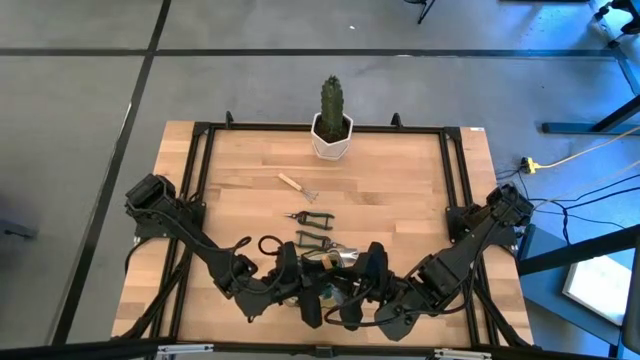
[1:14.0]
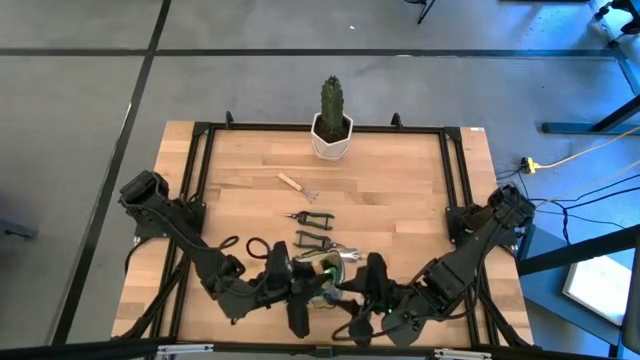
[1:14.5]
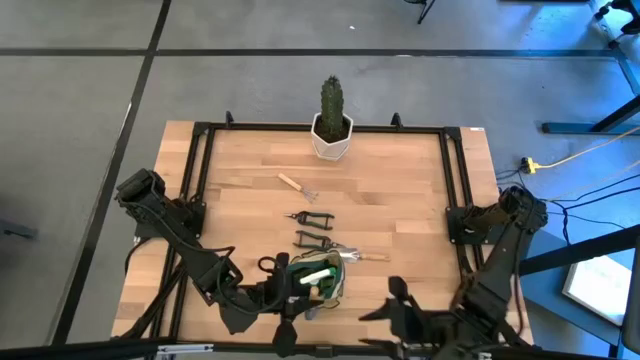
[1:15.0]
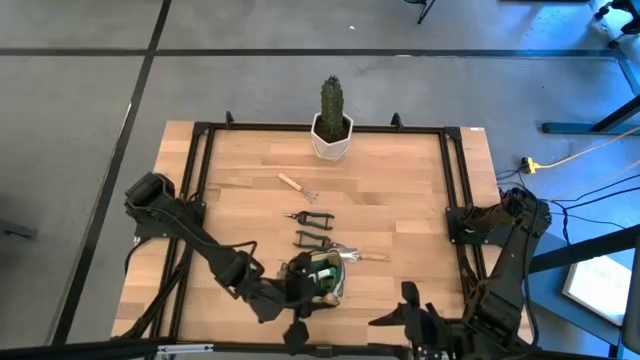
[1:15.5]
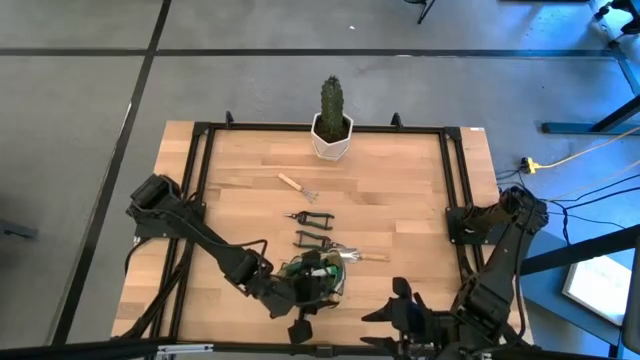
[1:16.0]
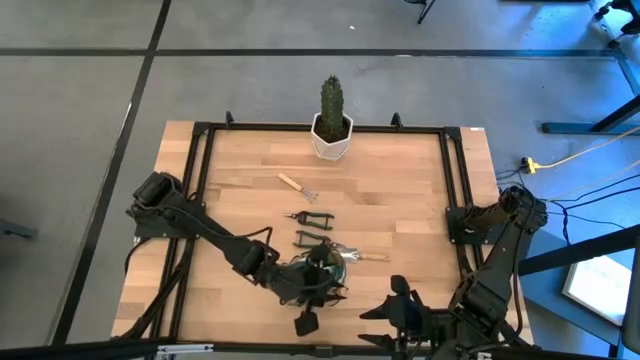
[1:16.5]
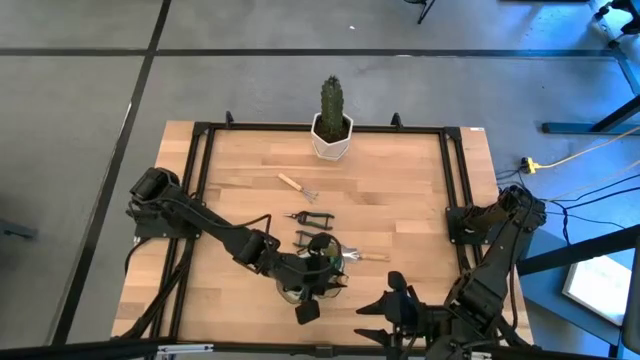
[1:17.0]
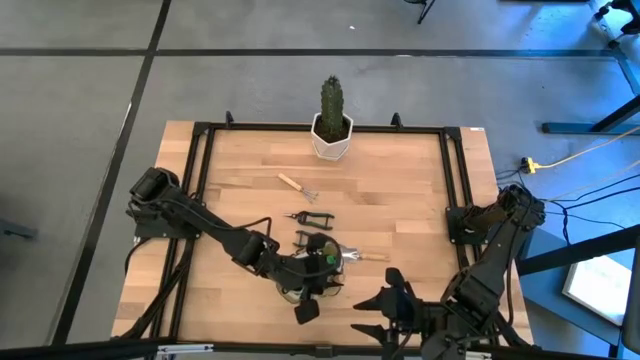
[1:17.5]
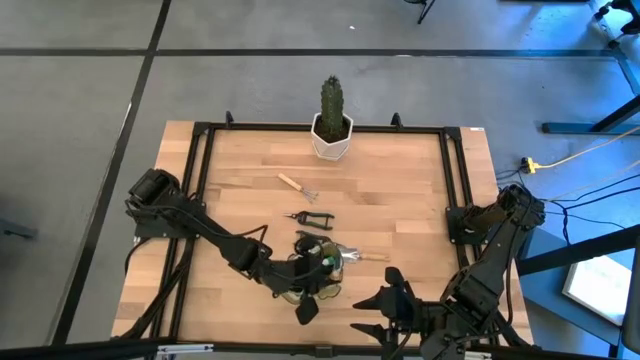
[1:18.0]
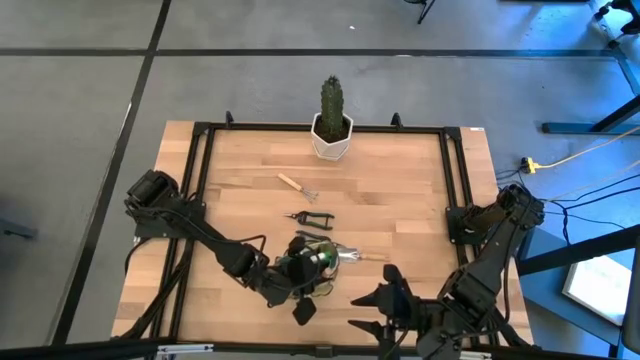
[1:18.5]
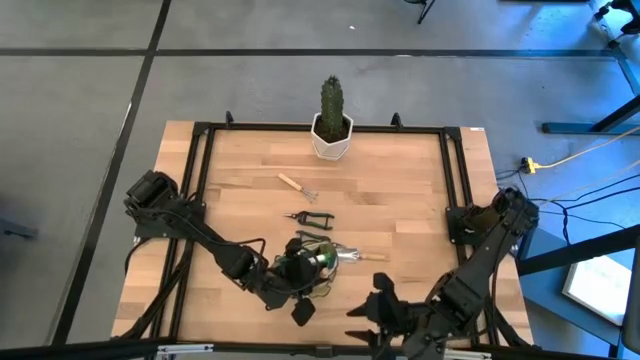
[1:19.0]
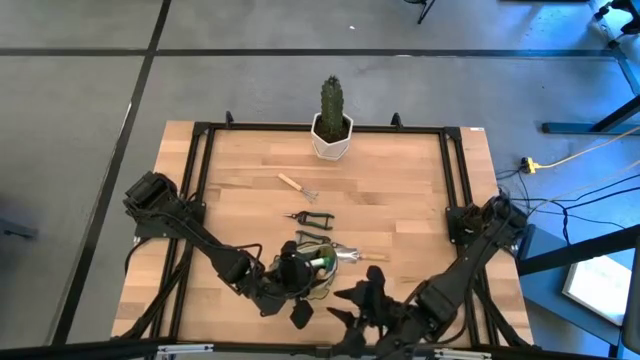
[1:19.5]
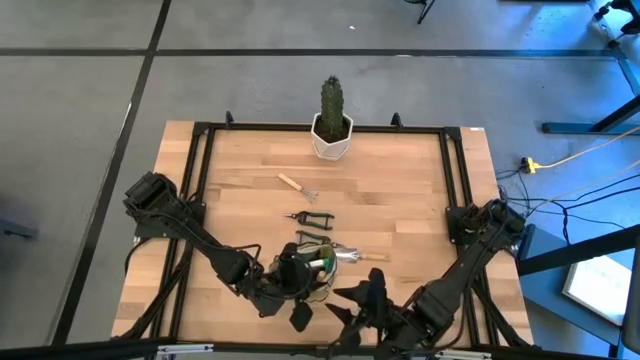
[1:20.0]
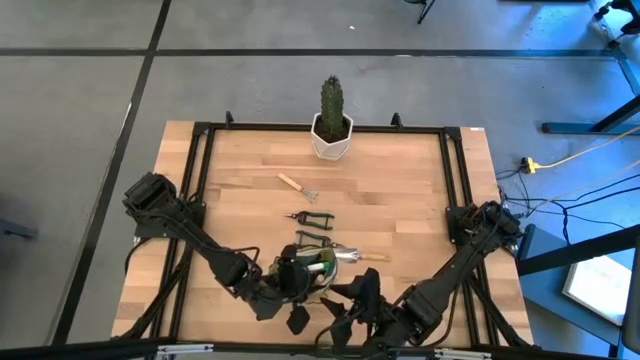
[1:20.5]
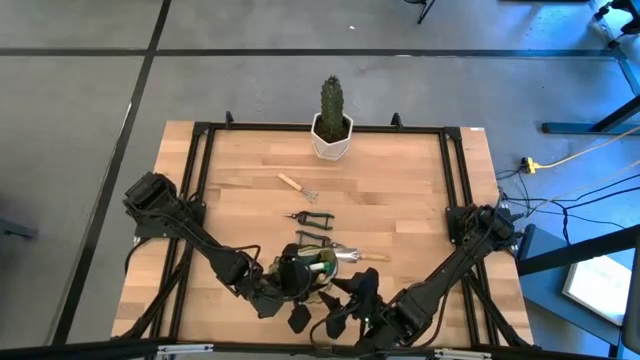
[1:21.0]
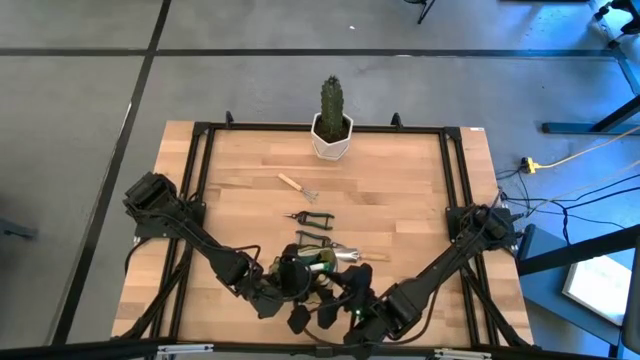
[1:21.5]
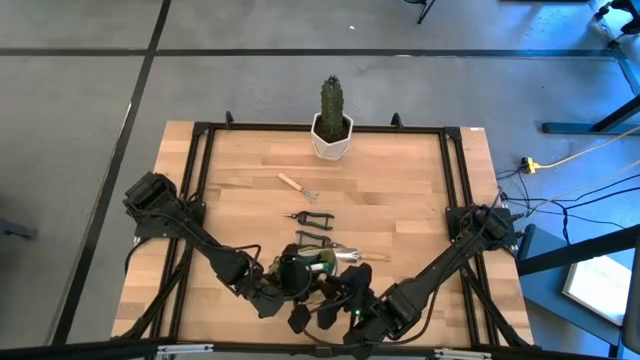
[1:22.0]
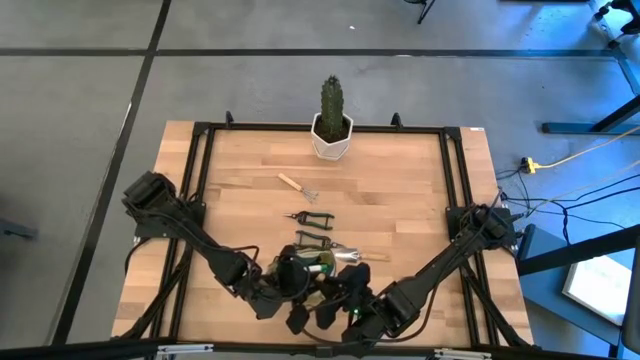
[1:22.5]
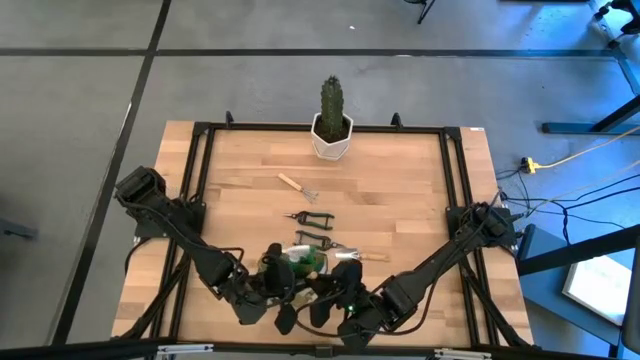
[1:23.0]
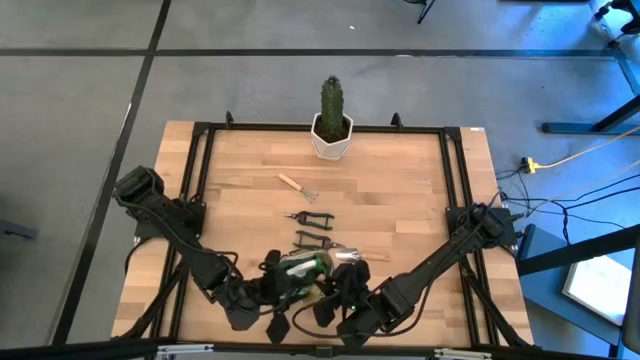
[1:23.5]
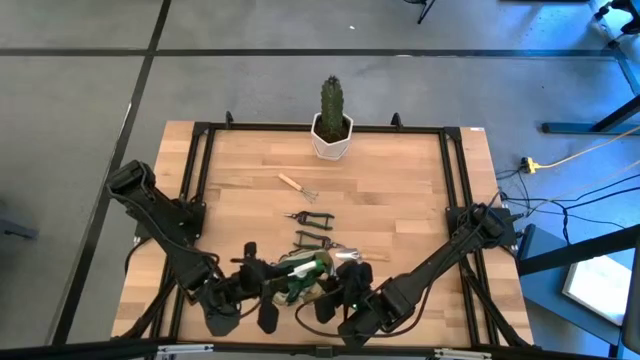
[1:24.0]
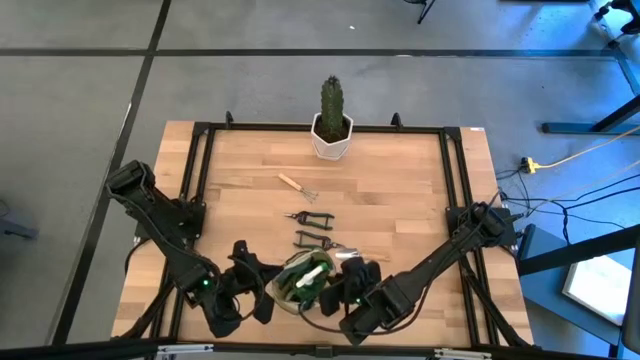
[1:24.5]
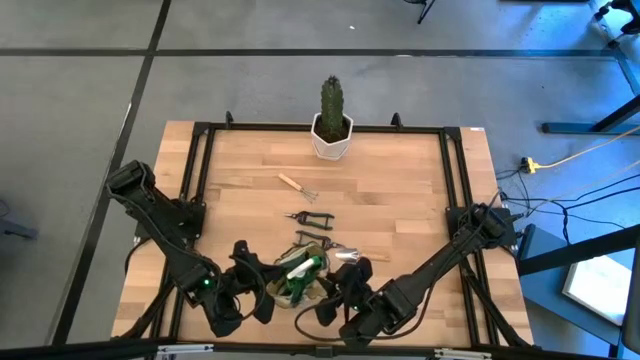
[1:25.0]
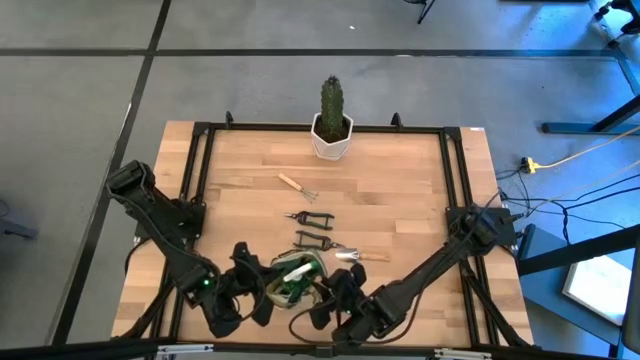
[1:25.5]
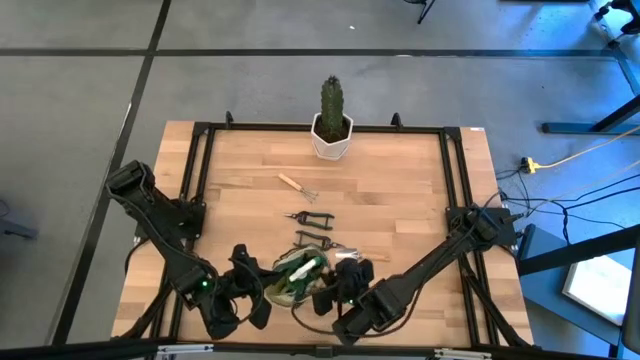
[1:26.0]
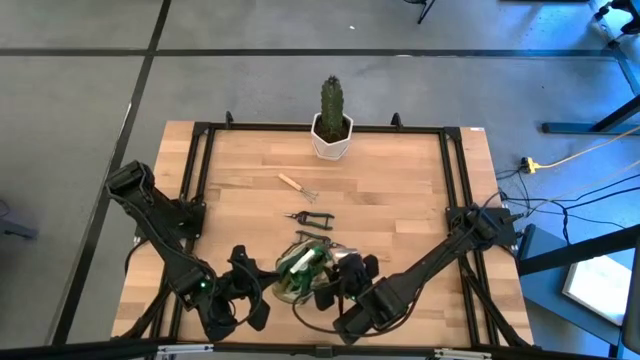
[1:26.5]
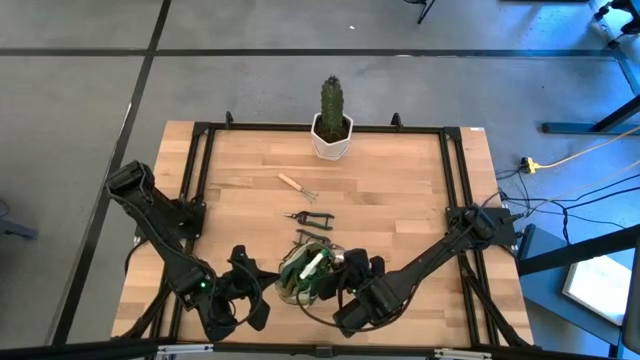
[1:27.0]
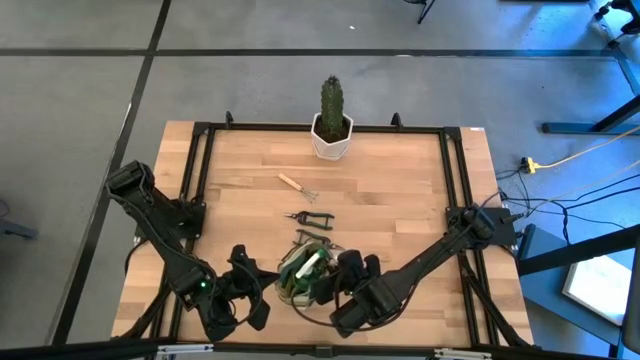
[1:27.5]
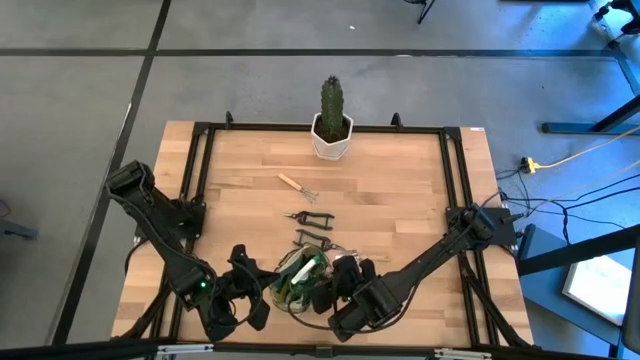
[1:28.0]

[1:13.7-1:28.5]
Task: Pick & Place Garden tools in Gardening bag
Put the trowel into the gardening bag

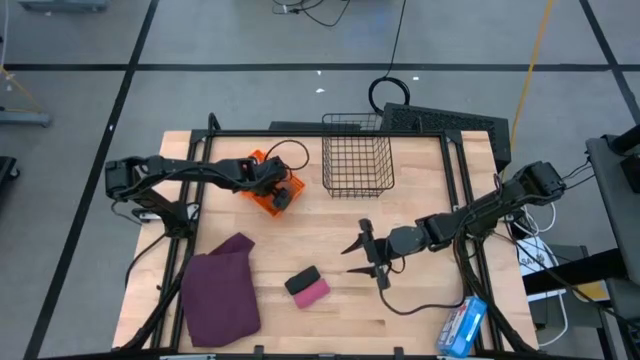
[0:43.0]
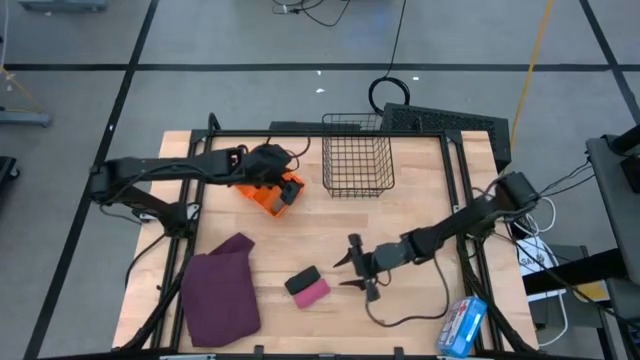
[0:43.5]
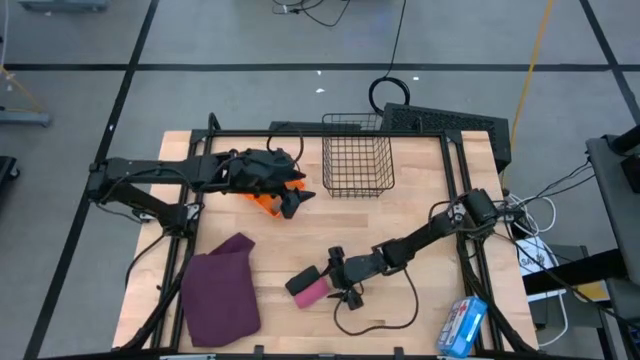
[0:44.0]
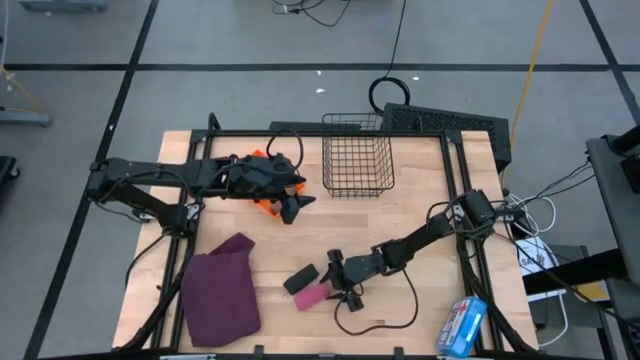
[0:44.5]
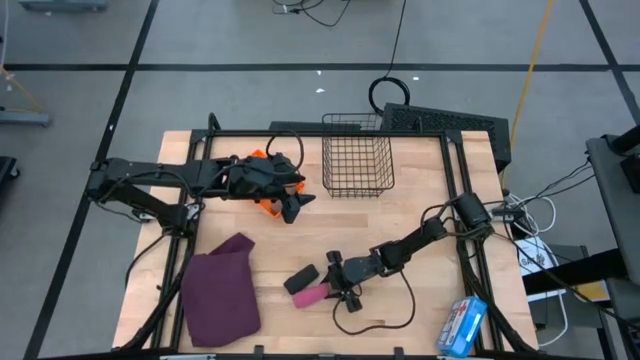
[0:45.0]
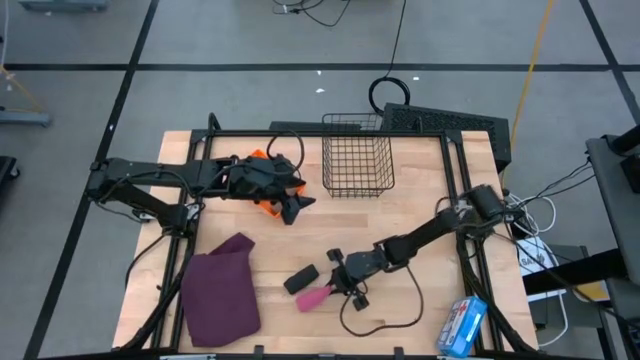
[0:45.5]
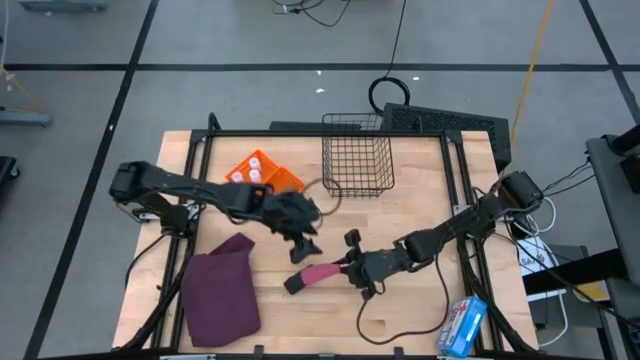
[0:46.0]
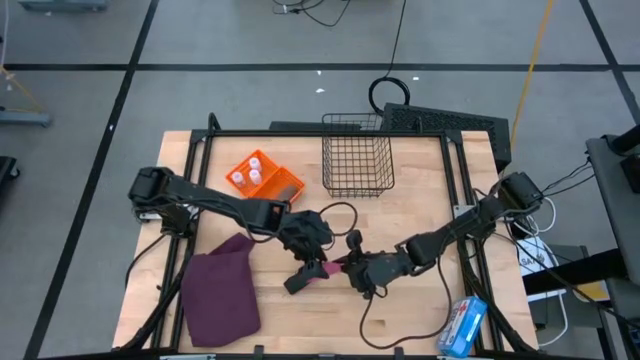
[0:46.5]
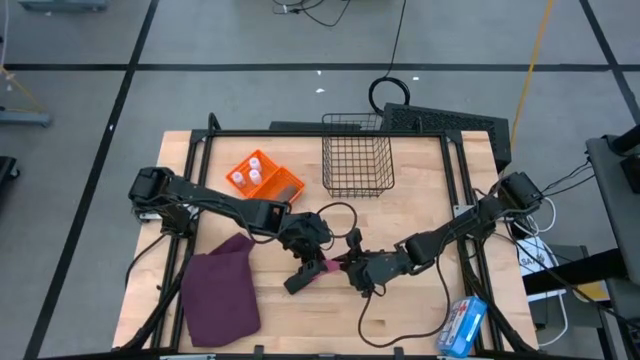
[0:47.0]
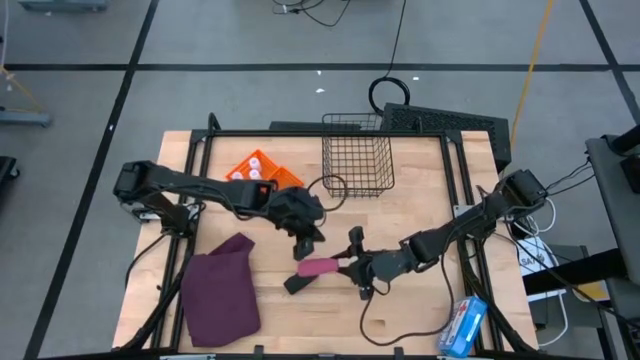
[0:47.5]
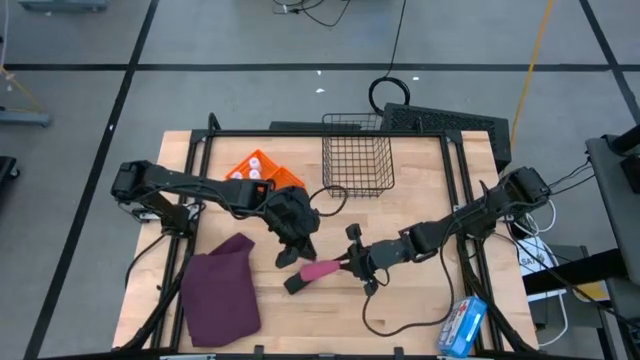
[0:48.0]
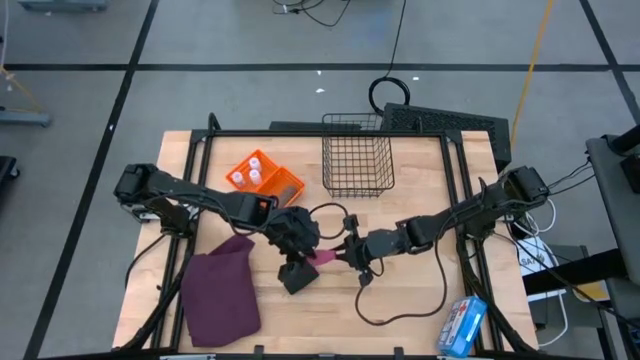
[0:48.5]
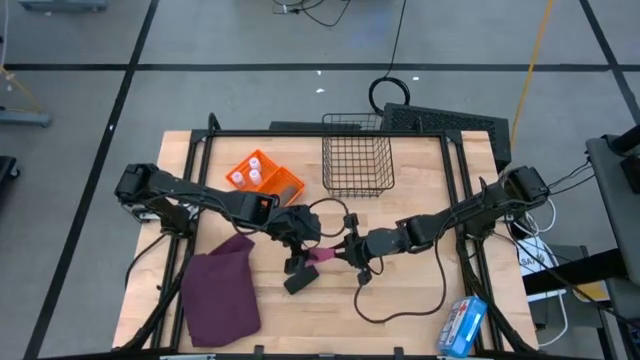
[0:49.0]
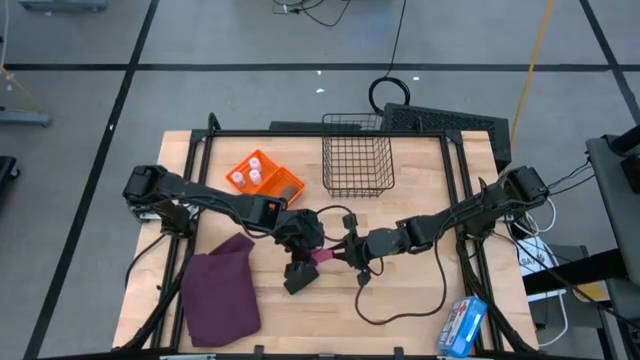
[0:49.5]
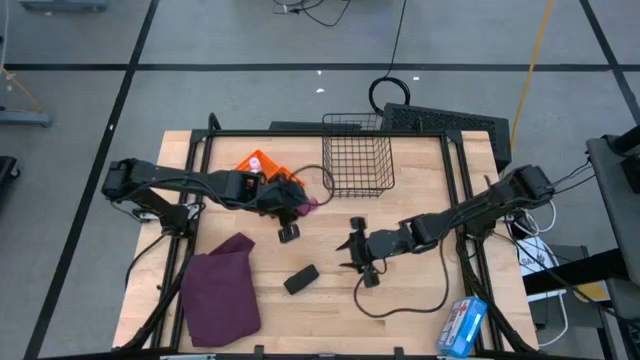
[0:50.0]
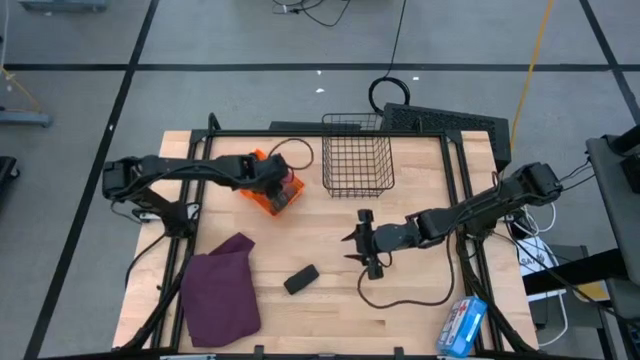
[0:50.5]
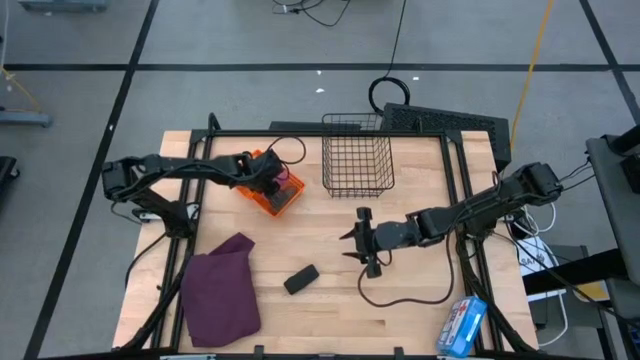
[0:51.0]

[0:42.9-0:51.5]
Task: Pick & Place Medicine items
Put the pink bandage into the bottom orange basket
